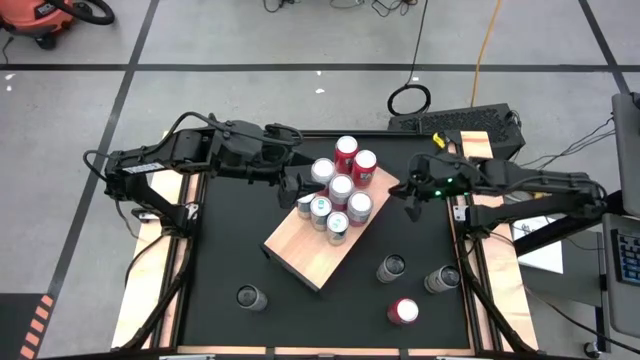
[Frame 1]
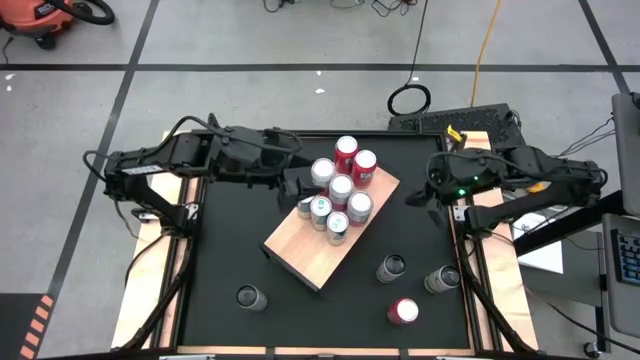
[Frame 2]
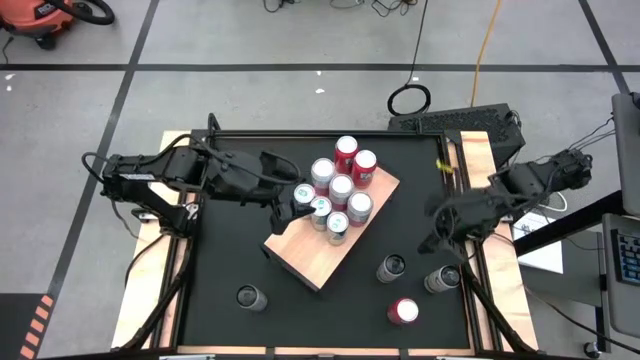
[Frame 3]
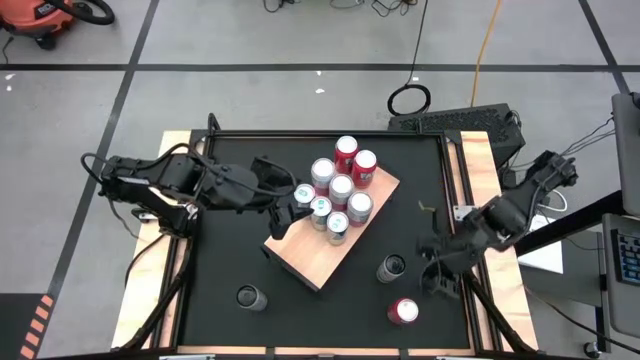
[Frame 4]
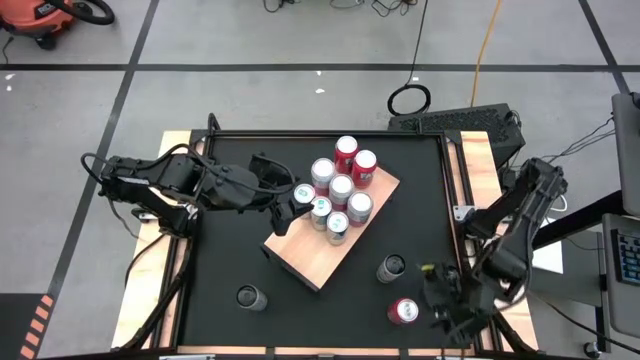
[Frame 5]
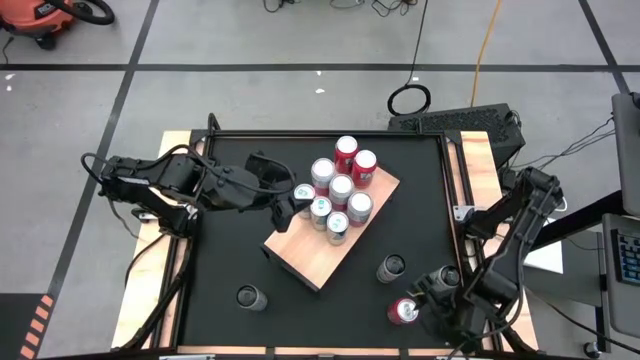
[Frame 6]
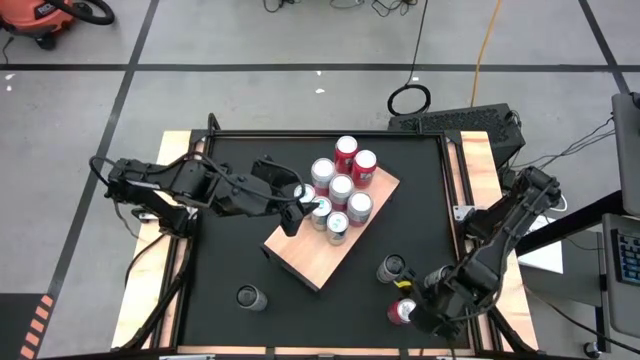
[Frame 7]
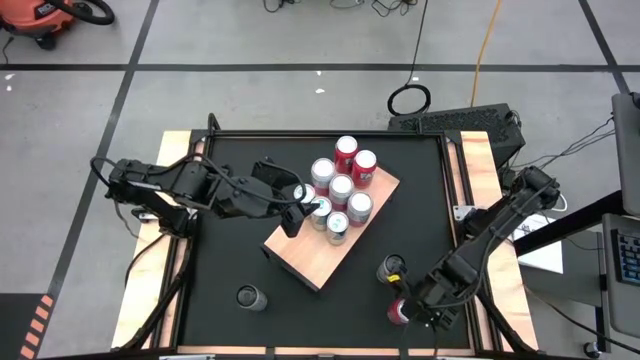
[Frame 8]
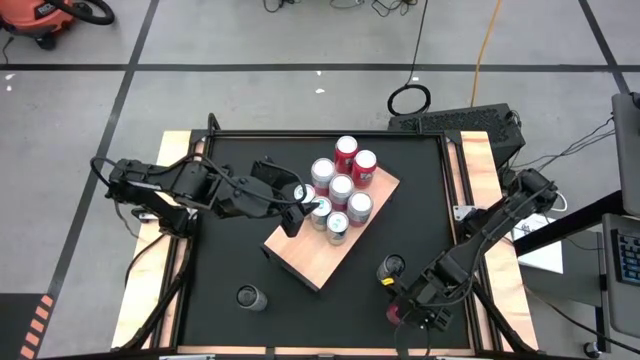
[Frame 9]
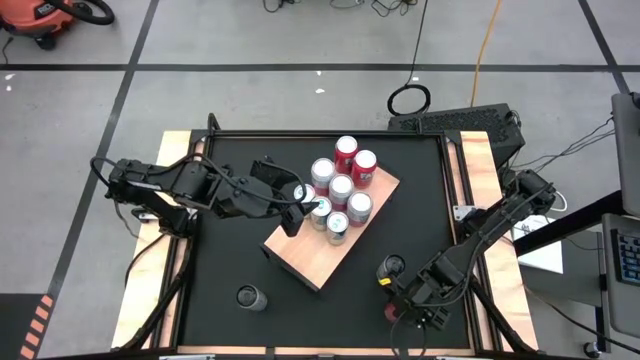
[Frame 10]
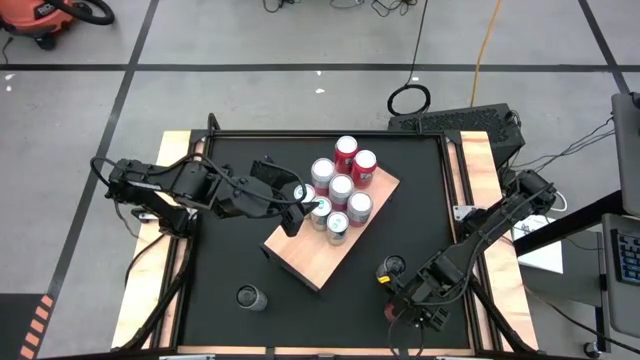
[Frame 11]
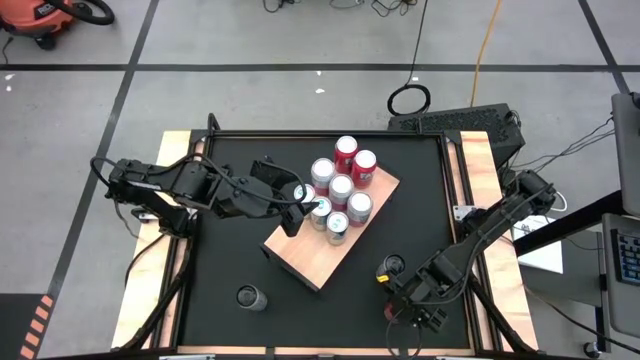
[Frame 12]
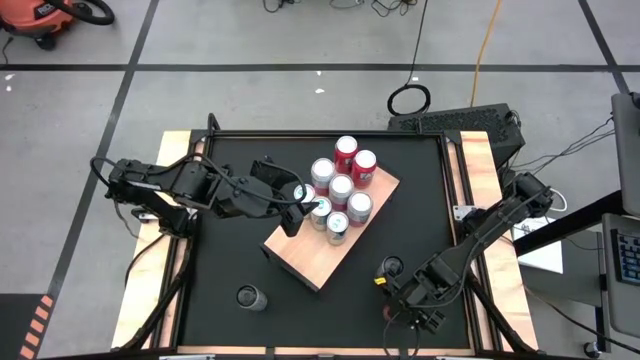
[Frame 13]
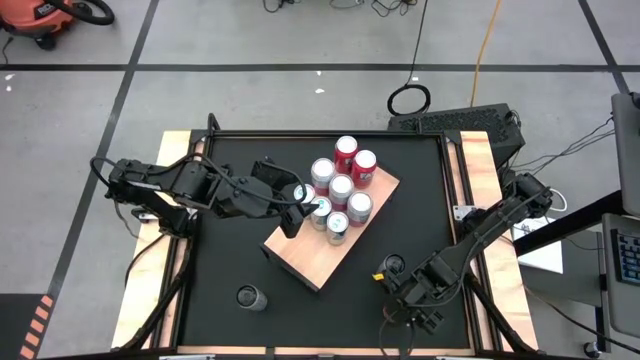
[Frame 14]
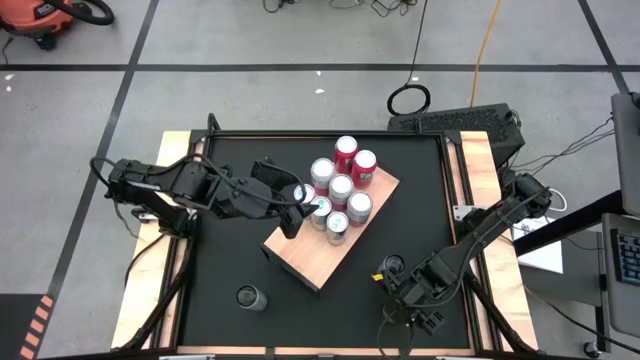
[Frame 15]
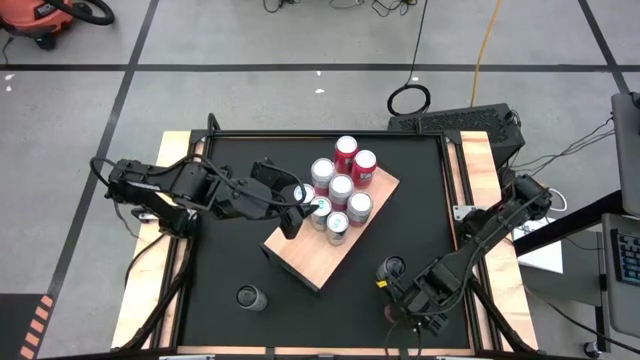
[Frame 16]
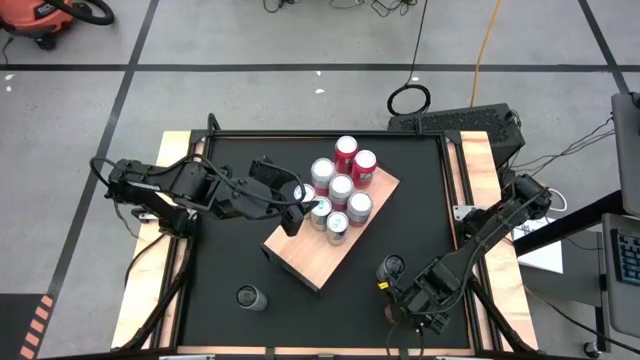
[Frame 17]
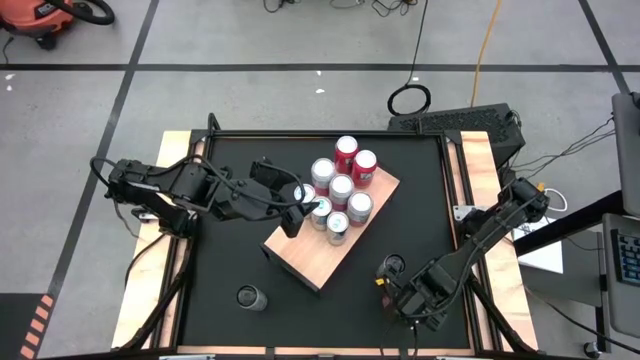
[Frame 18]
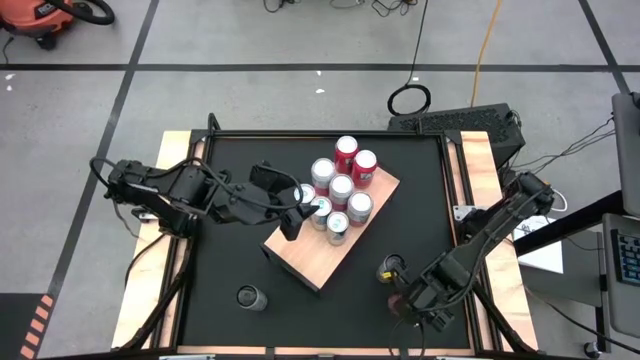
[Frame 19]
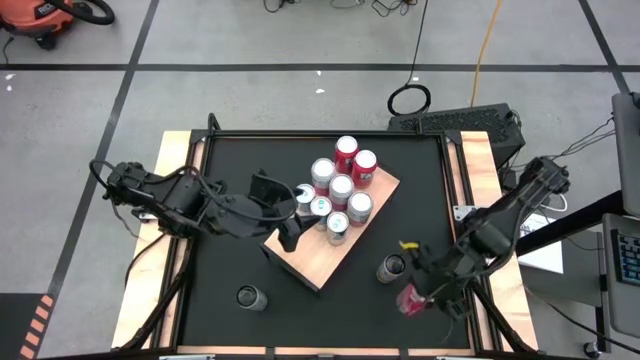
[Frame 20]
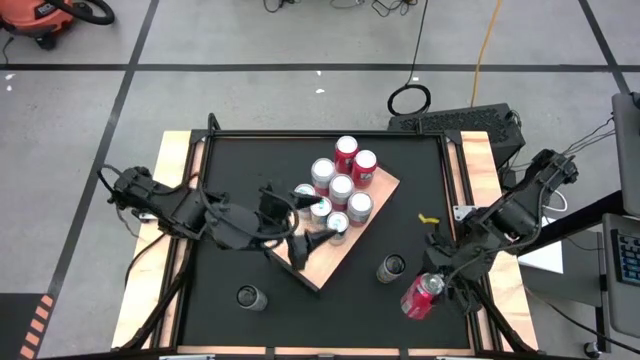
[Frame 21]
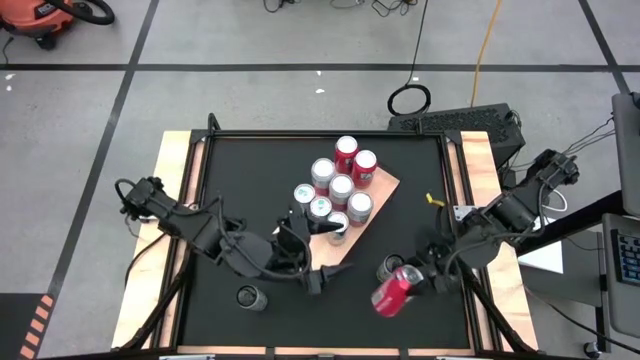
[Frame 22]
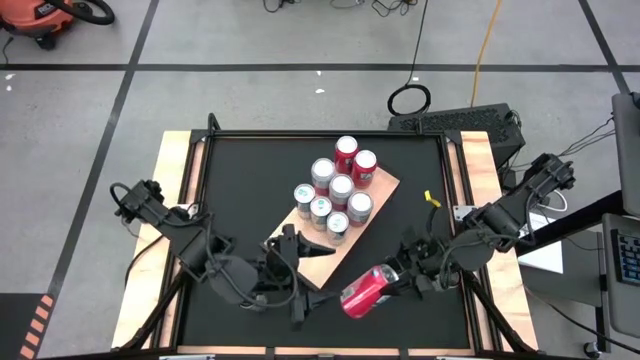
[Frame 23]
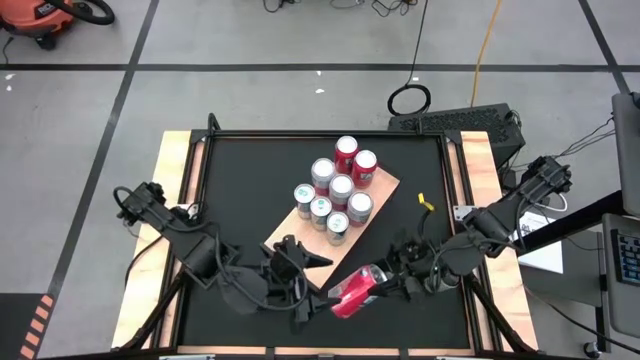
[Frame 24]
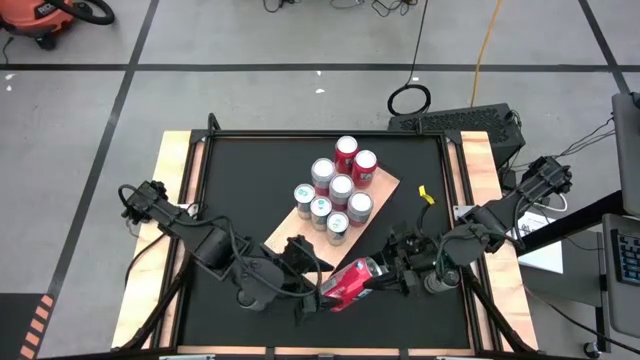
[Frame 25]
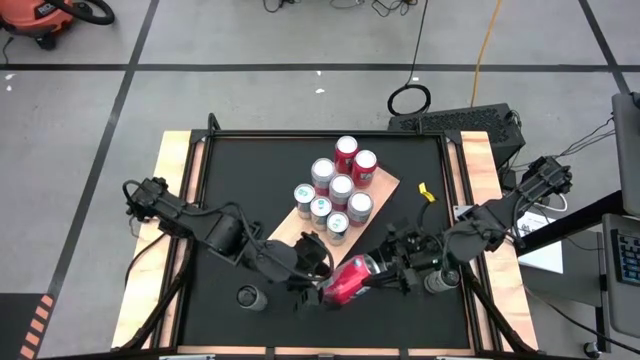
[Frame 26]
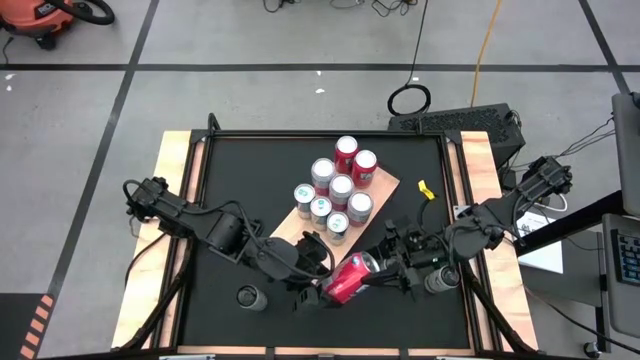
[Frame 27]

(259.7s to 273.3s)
Task: Place canned beverage on shelf
Put the red soda can on the shelf aligned with the red soda can

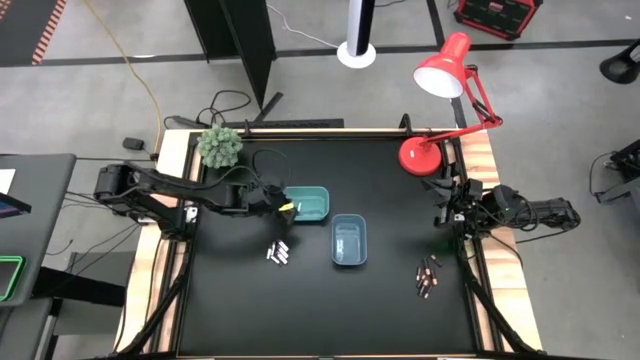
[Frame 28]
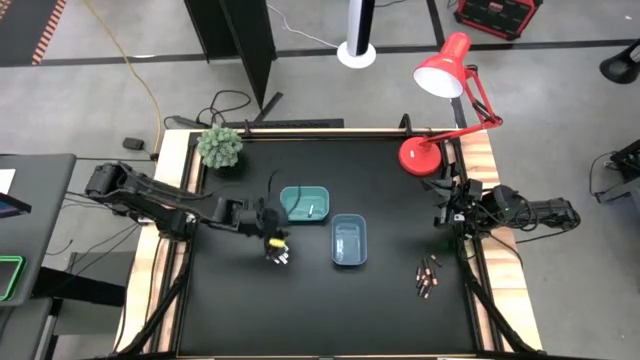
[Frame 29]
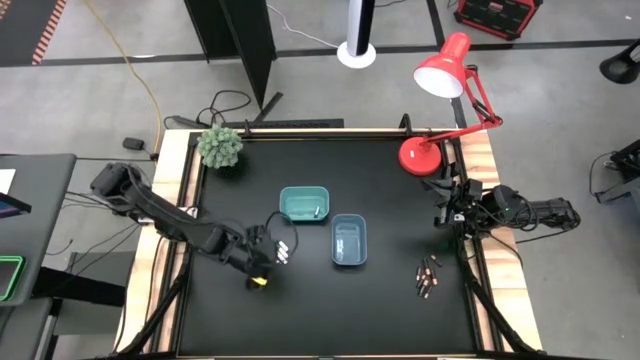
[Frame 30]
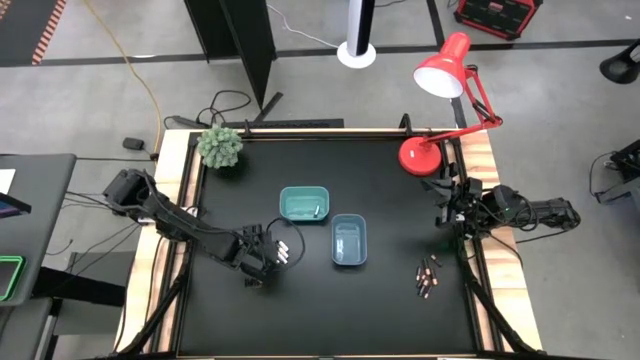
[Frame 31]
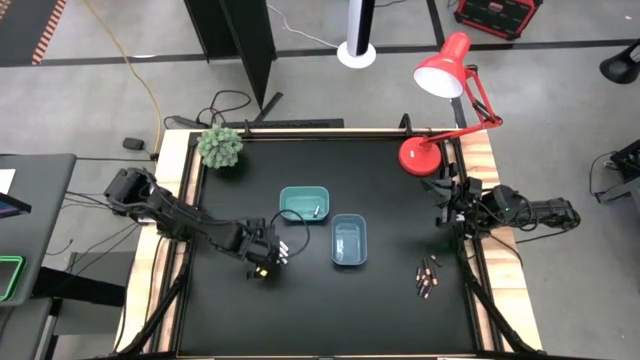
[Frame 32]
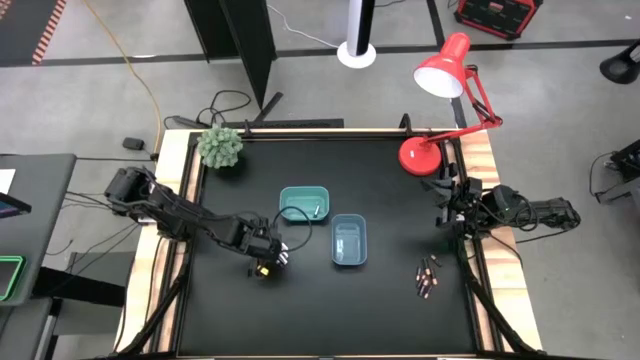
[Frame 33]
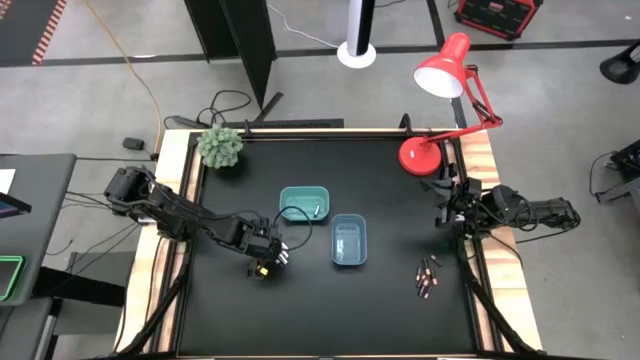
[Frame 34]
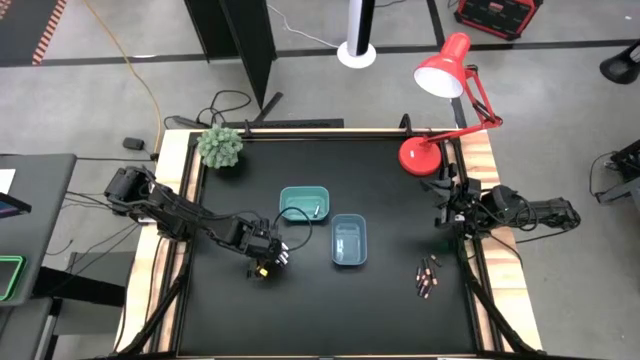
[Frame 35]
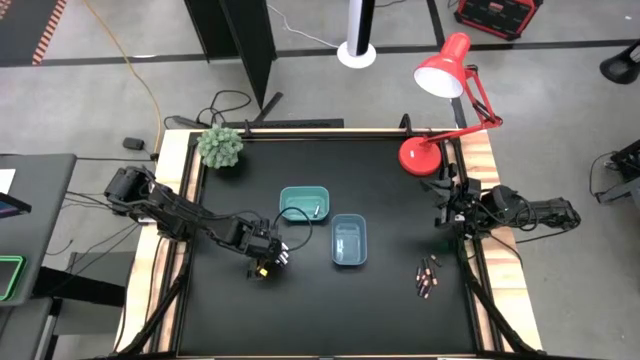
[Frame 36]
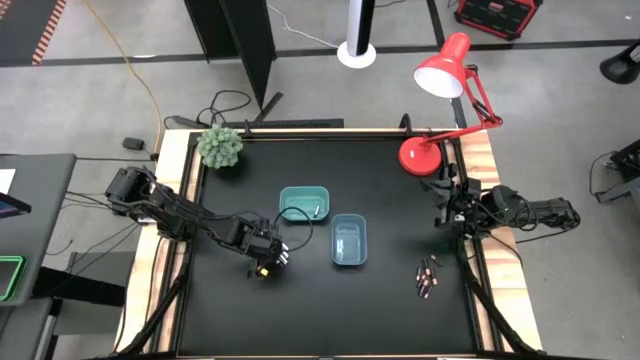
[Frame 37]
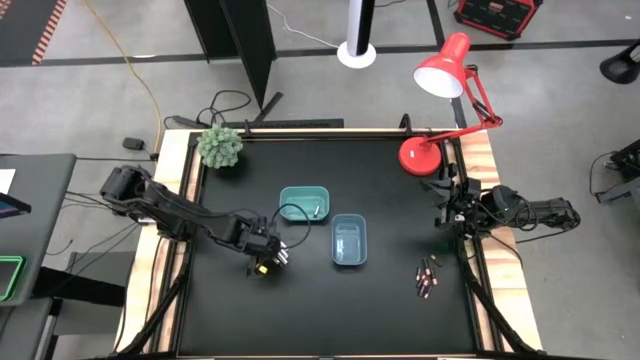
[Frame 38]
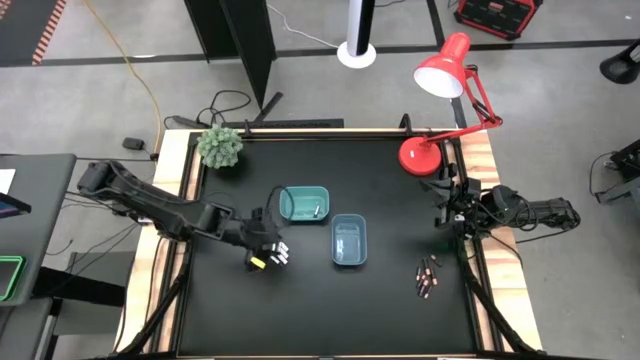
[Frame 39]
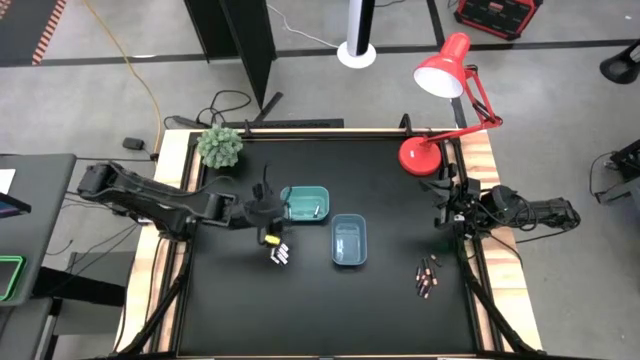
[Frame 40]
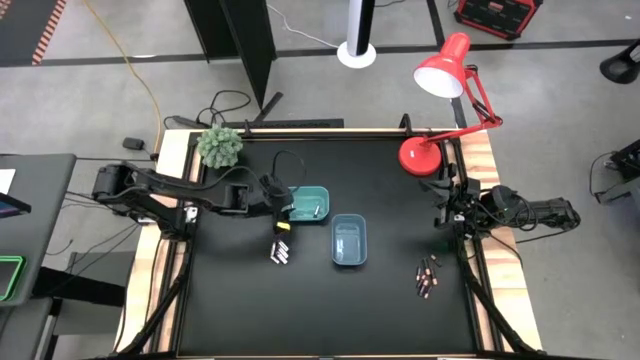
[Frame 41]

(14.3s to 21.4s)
Task: Sort batteries
Put the silver battery into the light blue bin

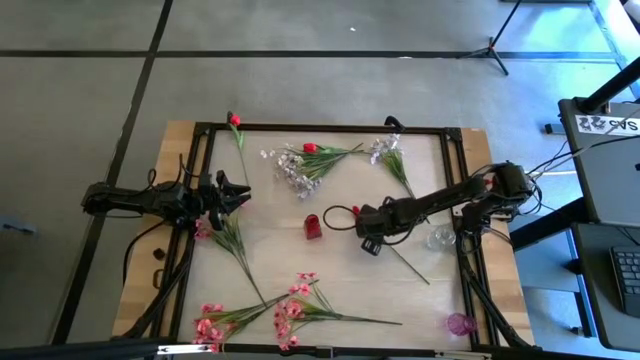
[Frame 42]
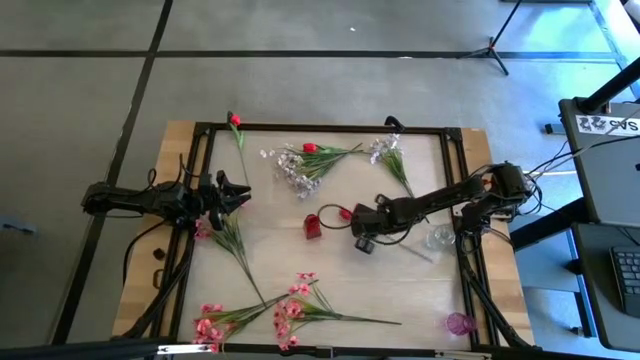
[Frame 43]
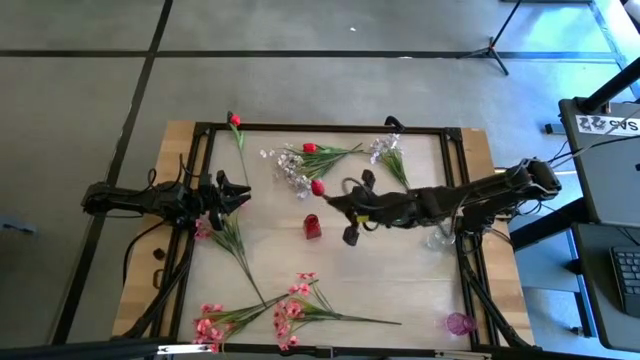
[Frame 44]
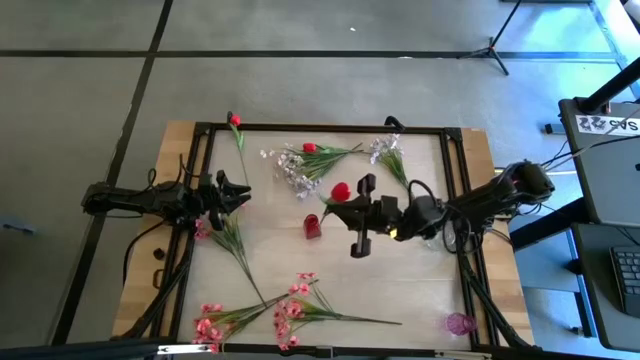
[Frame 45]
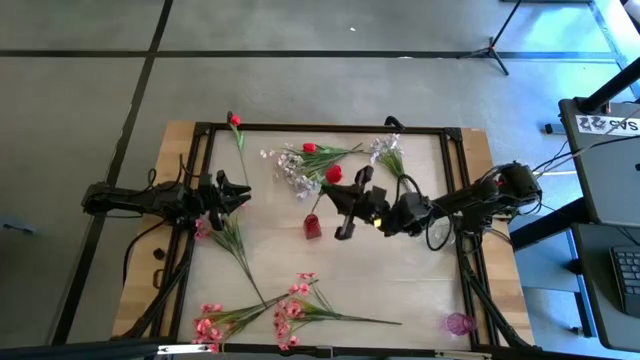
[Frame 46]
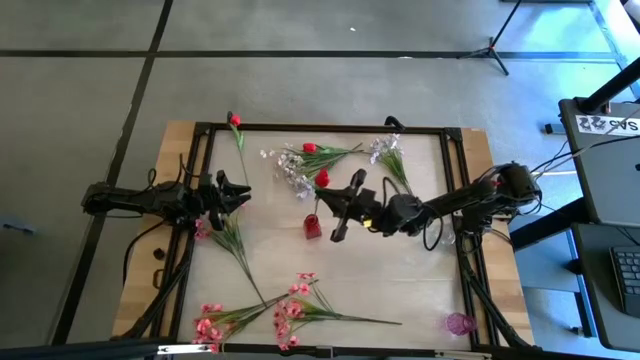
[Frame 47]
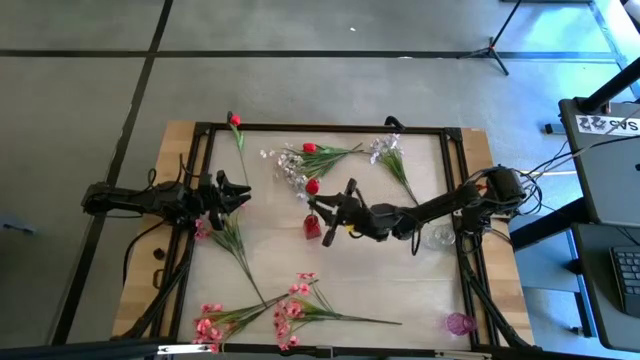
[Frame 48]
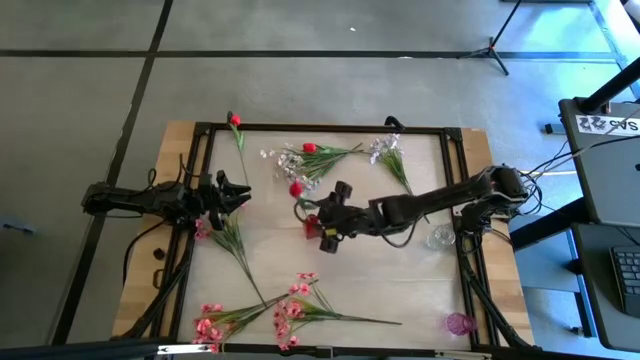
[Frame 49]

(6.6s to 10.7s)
Task: Sort flowers into vase by color
Put the right red tulip into the red vase
